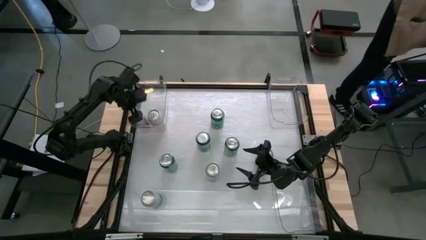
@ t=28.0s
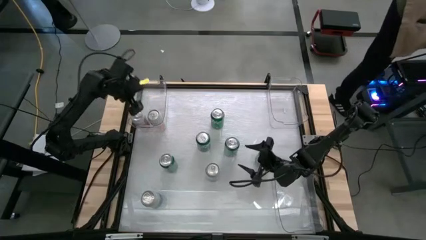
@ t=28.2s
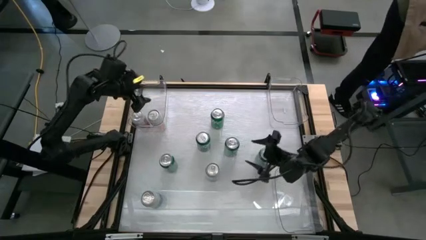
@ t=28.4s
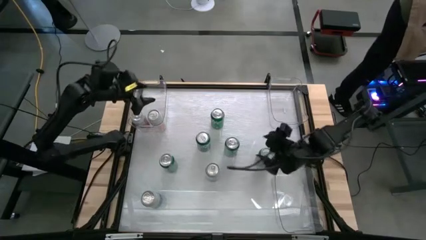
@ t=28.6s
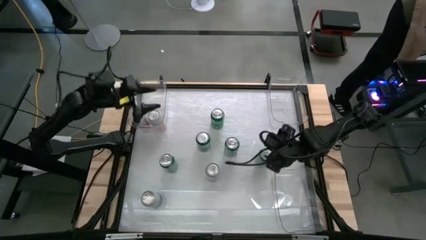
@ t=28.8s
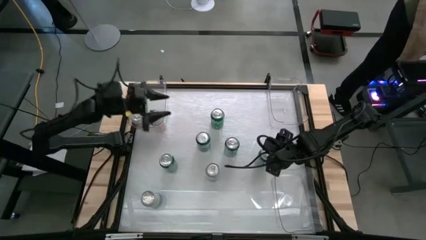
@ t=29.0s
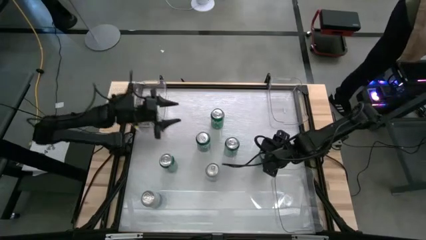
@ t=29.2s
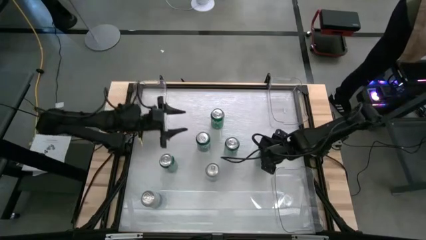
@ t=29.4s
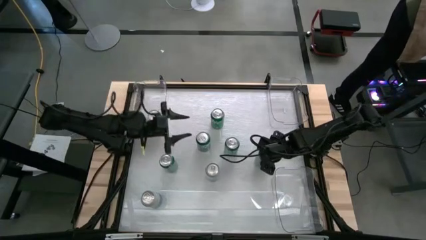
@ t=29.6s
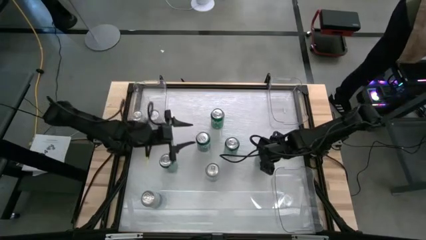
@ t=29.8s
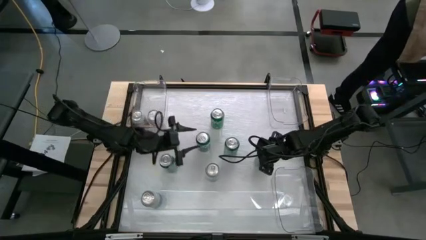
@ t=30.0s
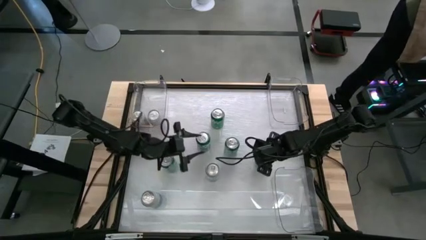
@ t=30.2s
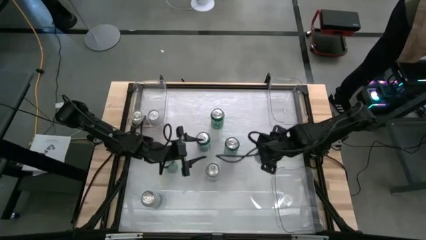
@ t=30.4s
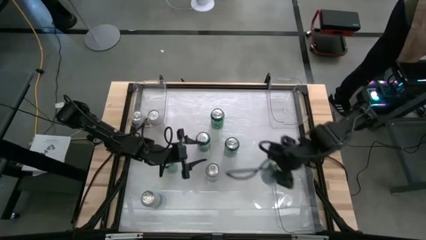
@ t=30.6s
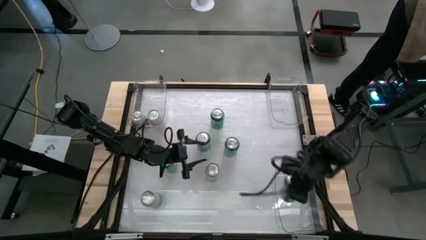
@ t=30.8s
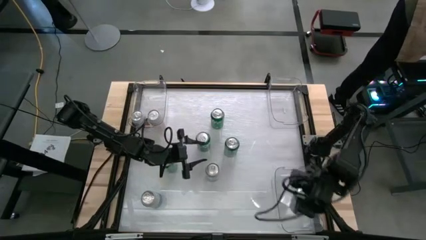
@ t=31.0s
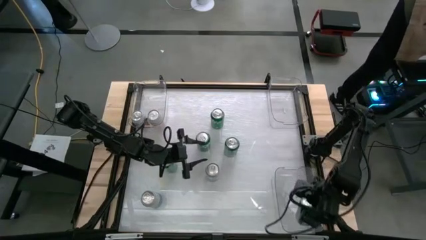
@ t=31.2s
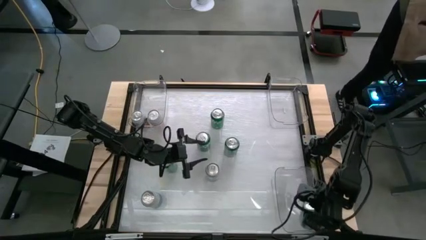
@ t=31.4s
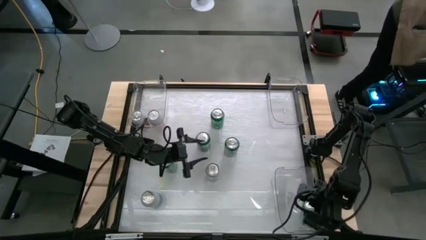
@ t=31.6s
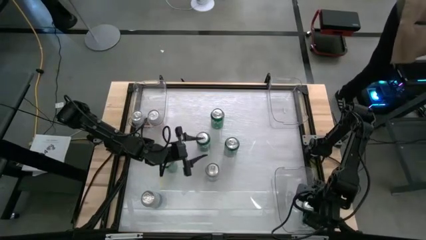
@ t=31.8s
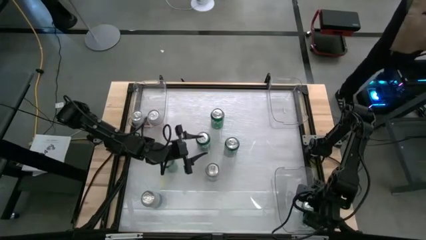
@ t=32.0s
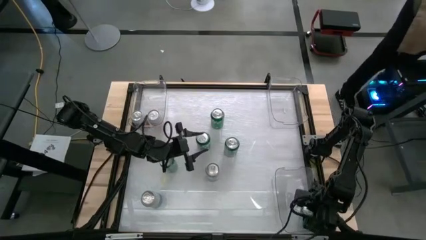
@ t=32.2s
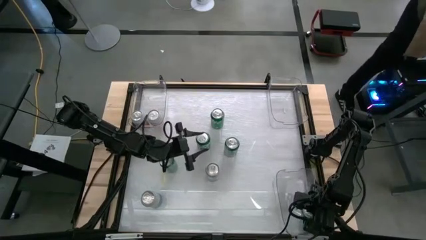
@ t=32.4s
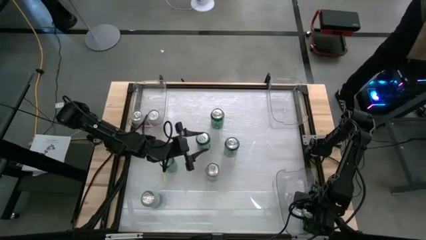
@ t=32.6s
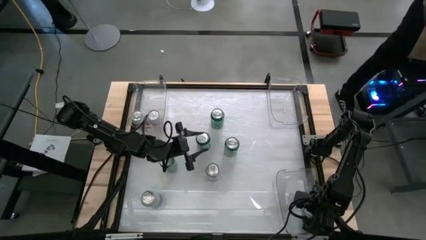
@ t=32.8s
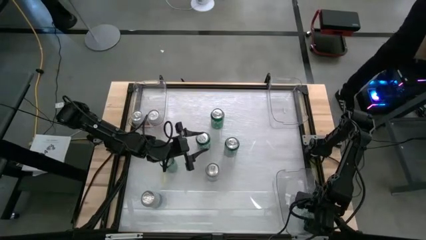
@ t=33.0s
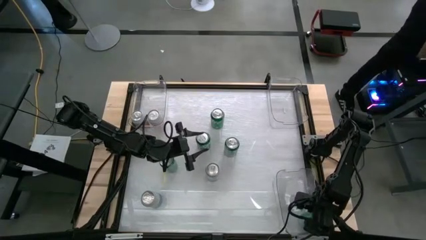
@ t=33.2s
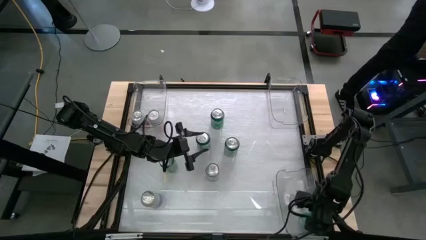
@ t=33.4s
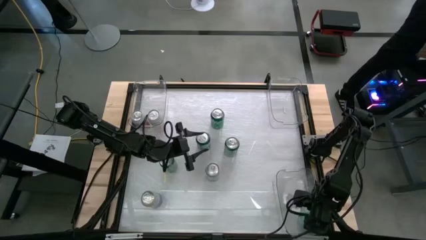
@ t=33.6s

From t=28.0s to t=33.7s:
Task: Sort soda cans
Put the green soda can into the bottom transparent bin

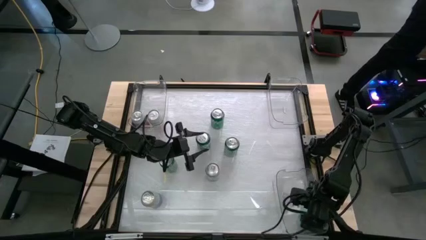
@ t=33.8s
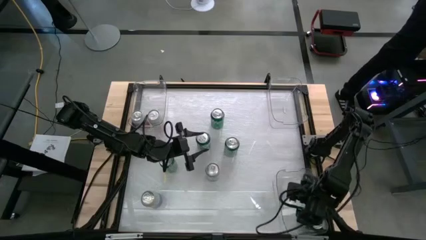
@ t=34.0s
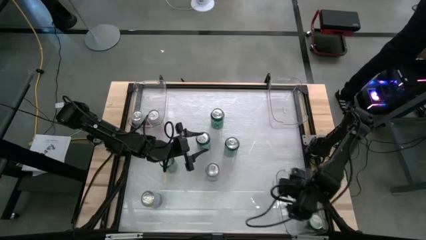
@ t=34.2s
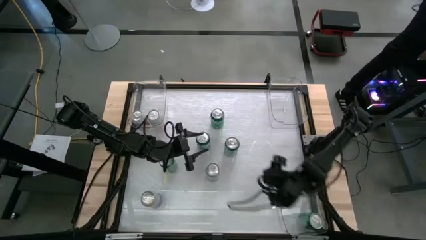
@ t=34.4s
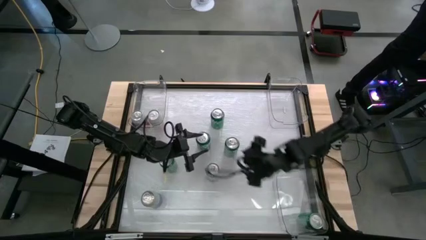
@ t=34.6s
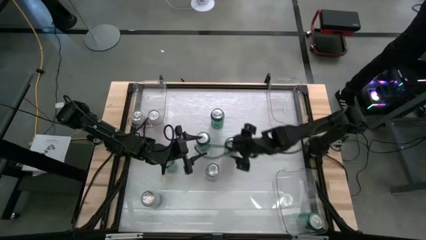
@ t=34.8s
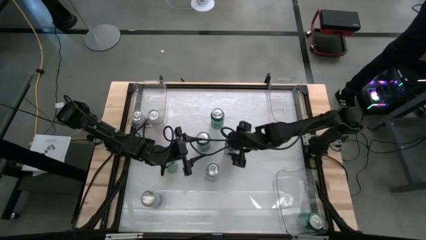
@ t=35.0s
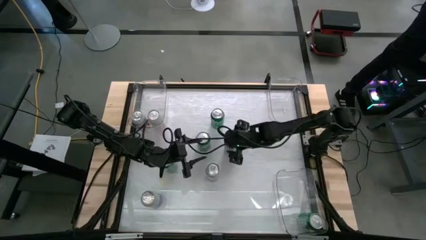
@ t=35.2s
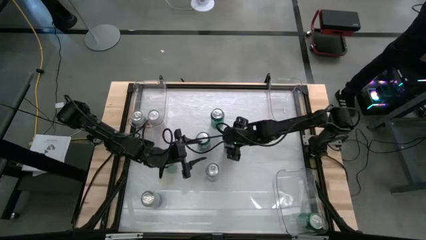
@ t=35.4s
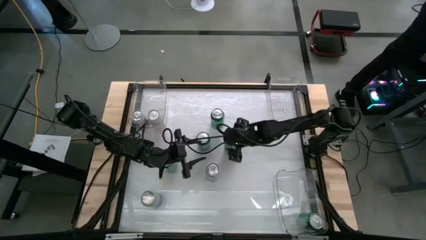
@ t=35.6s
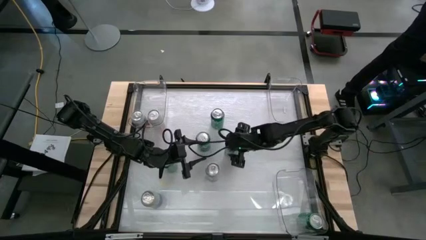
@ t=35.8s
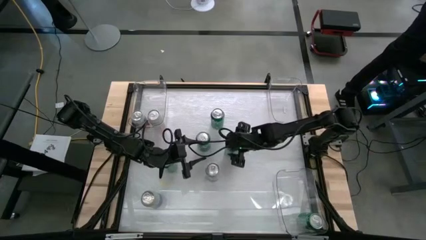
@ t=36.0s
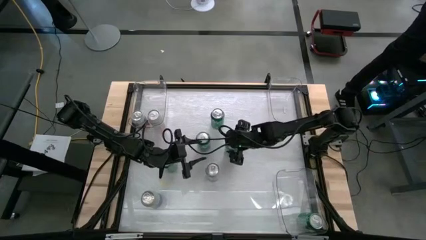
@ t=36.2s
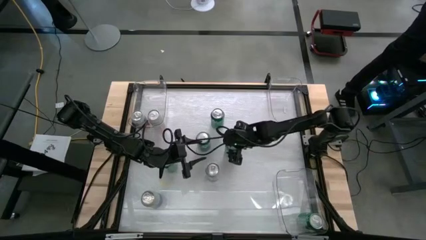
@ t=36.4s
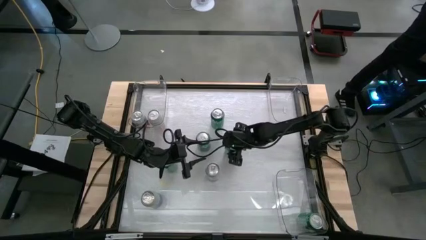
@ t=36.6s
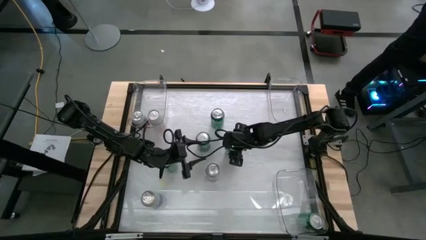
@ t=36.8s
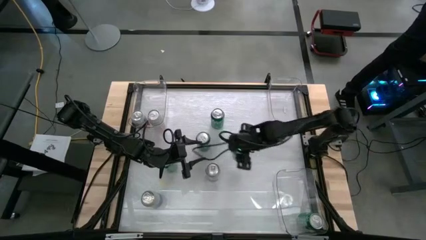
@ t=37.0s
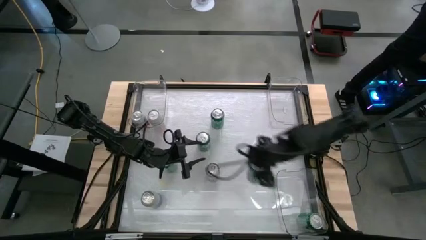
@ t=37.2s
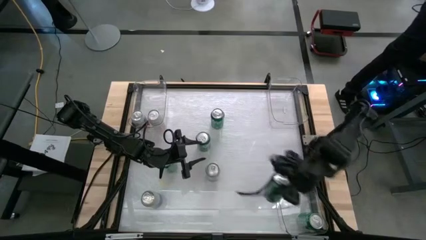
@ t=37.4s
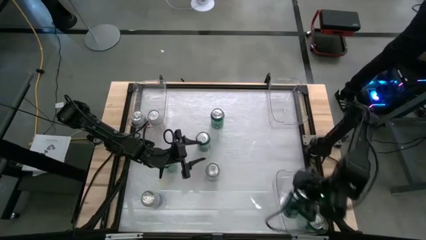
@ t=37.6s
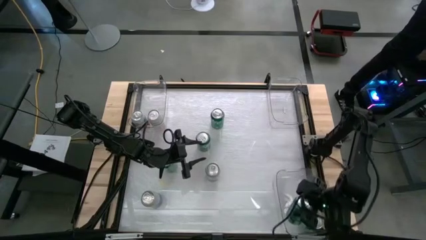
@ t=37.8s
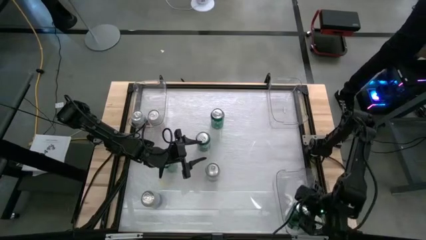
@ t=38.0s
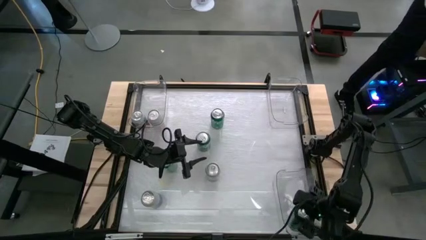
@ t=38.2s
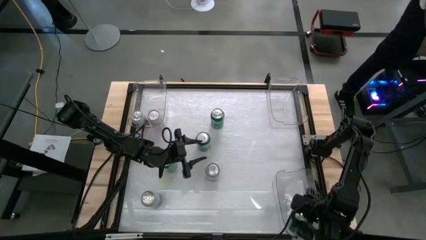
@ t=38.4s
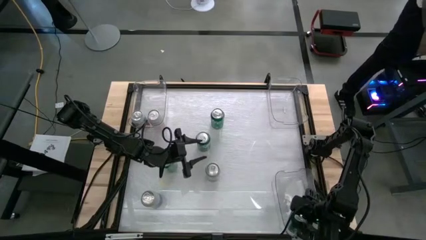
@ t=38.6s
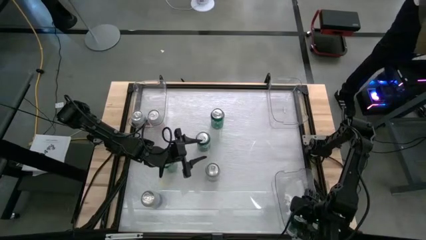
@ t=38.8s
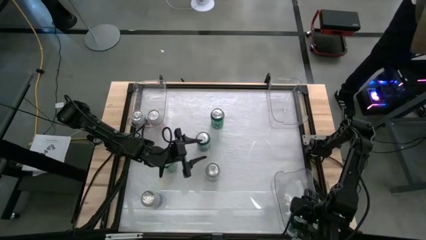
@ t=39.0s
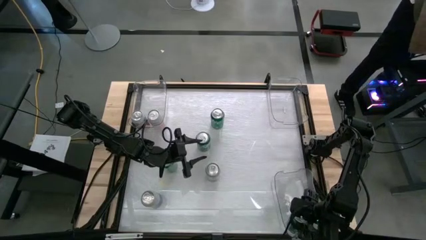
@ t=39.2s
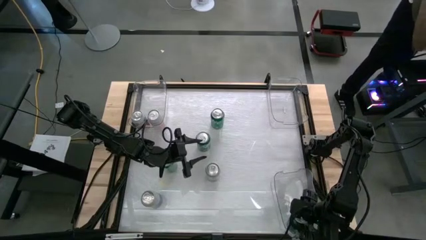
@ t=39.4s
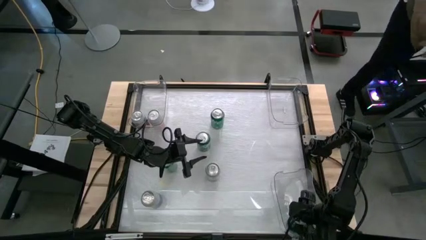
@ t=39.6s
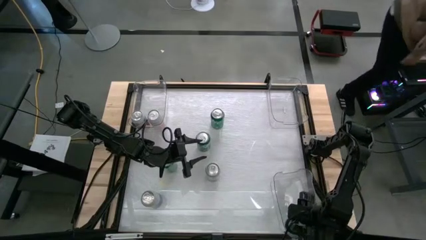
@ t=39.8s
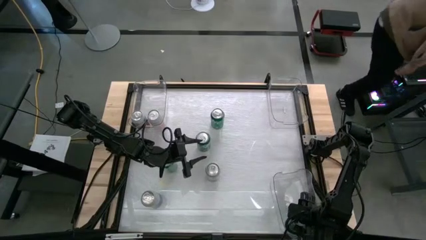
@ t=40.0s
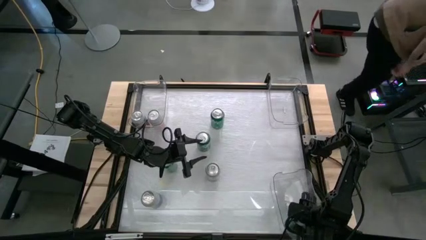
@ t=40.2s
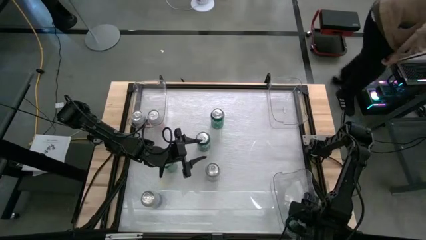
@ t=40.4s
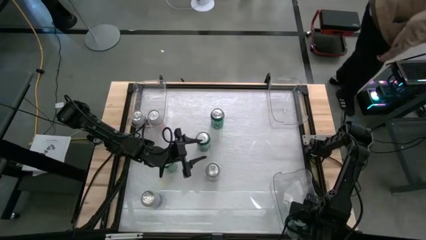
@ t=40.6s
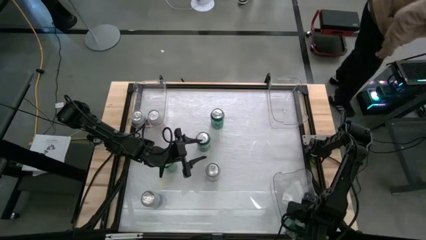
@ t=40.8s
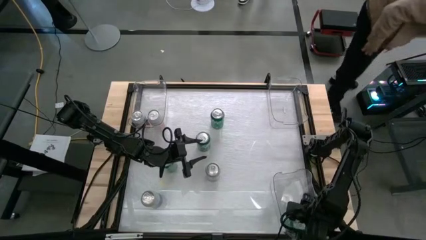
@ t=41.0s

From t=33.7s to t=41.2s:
Put the green soda can into the bottom transparent bin

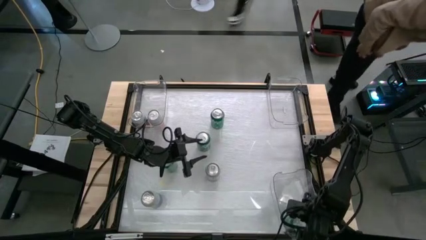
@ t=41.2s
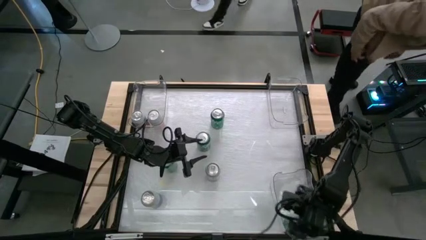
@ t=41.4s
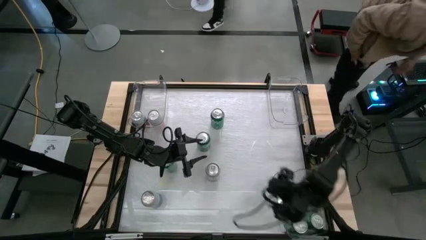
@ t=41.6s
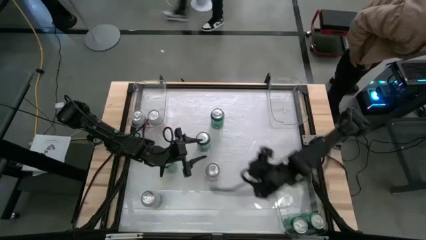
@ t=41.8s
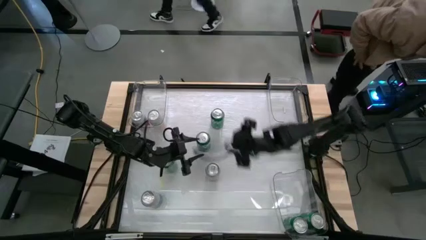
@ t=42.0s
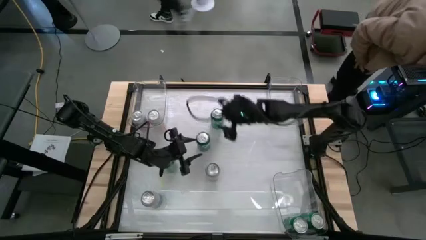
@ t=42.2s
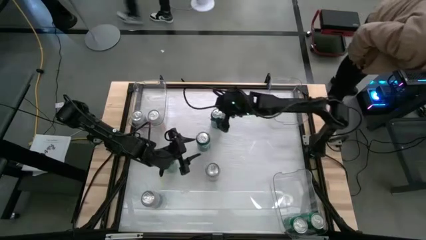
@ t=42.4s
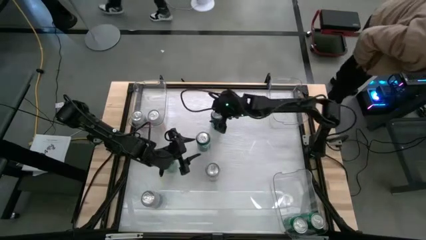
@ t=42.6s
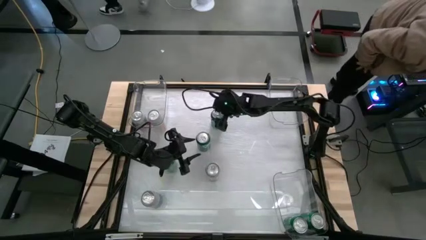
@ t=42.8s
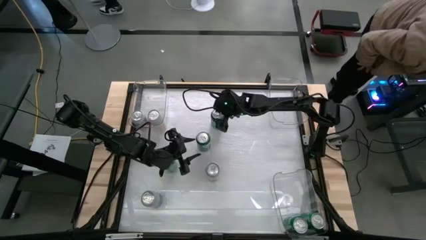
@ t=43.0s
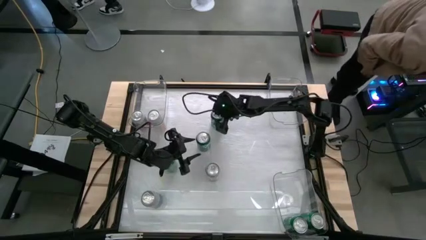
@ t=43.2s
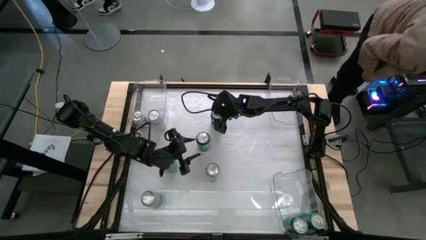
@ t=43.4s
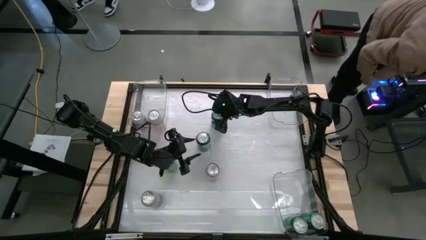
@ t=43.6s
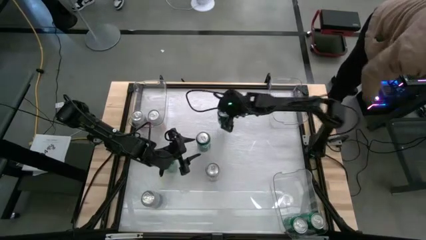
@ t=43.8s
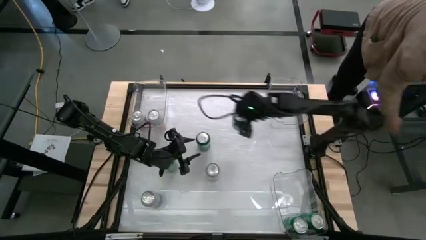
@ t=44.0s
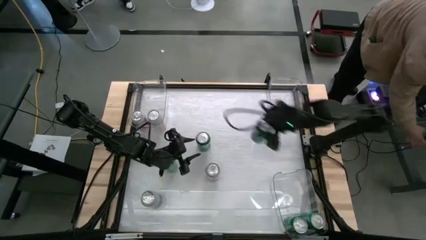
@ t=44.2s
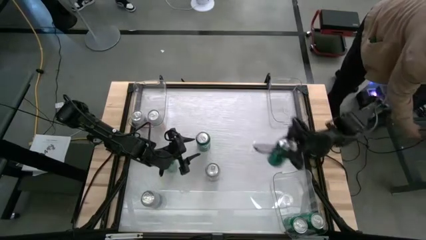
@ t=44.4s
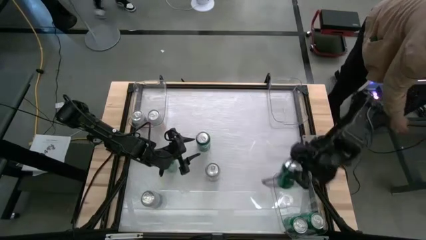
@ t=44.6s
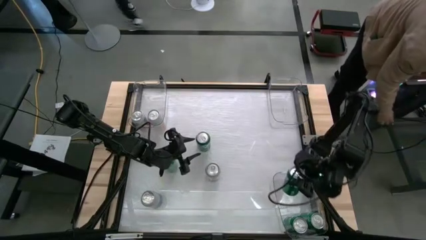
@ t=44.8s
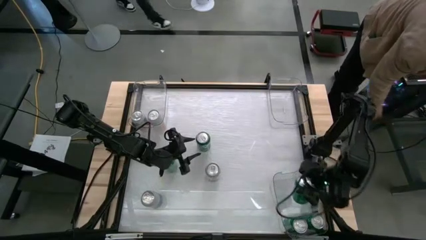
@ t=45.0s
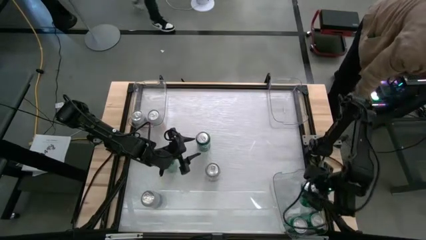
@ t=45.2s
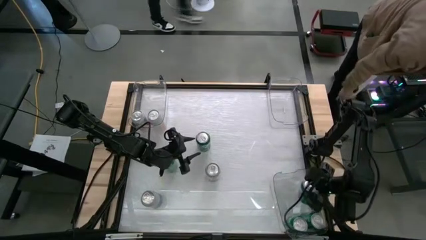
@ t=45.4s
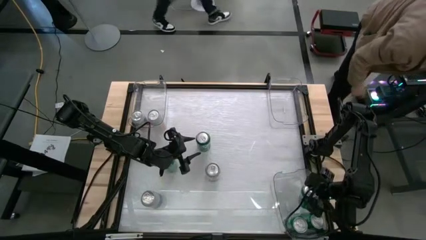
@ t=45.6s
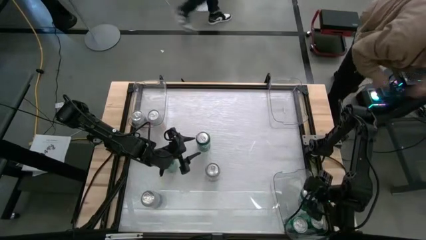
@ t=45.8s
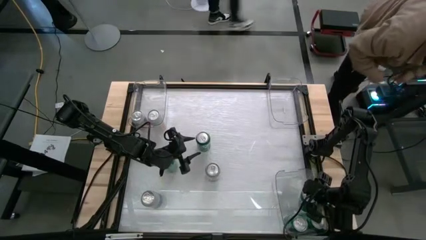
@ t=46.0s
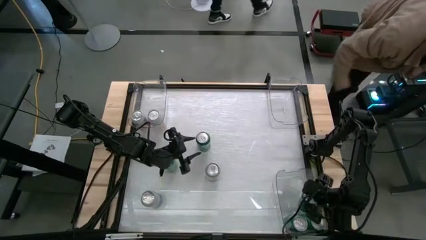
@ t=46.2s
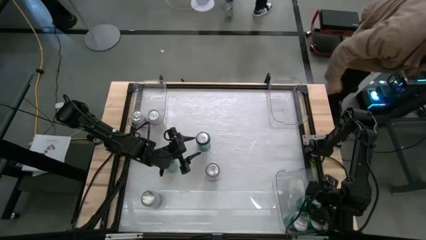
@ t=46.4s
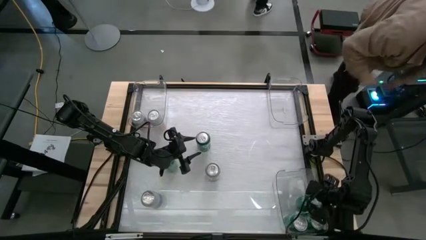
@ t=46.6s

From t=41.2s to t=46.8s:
Put the green soda can into the bottom transparent bin
